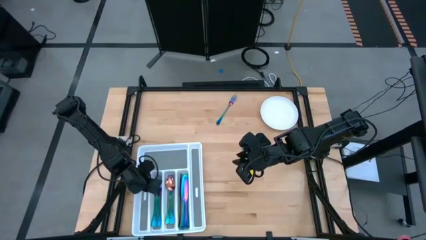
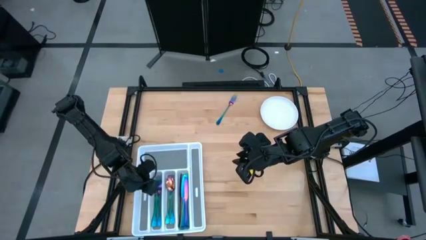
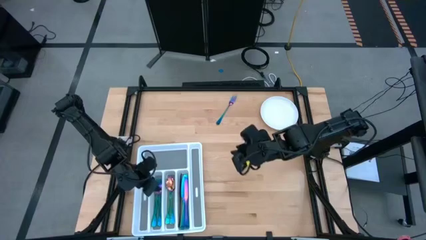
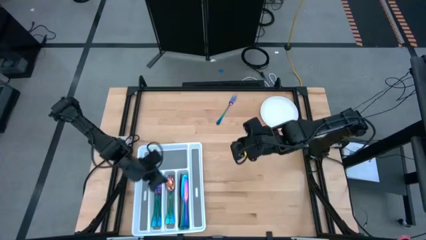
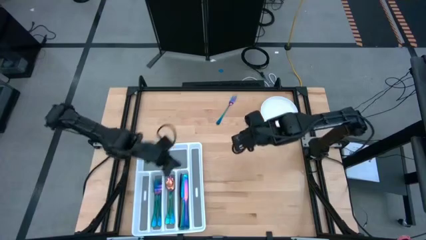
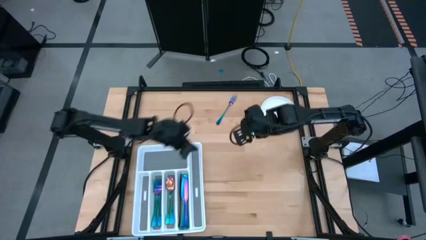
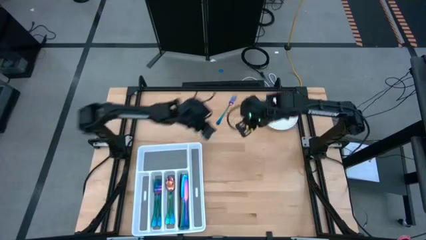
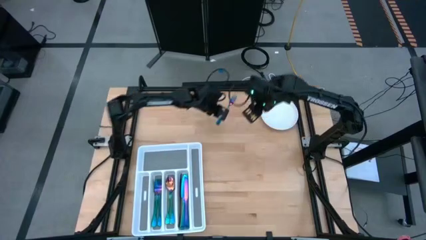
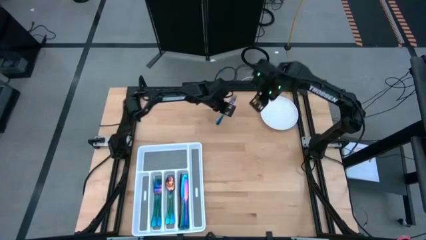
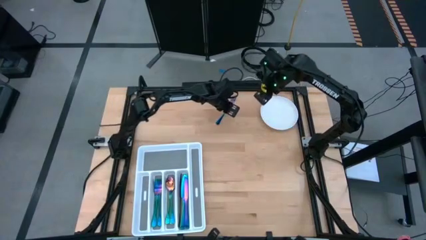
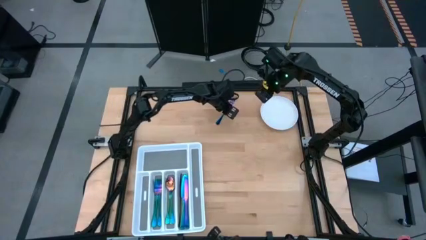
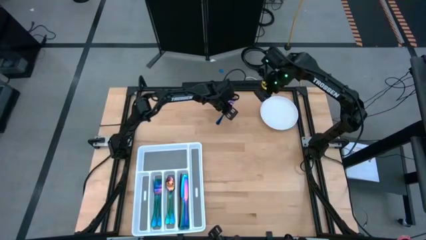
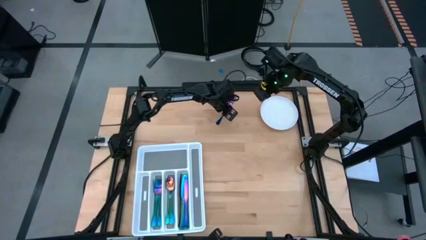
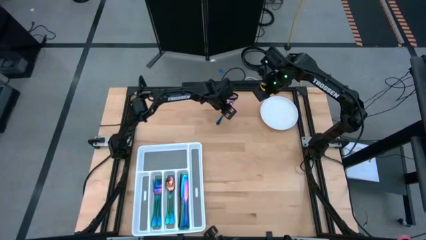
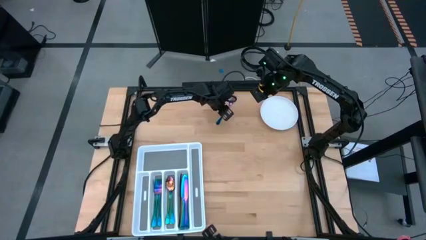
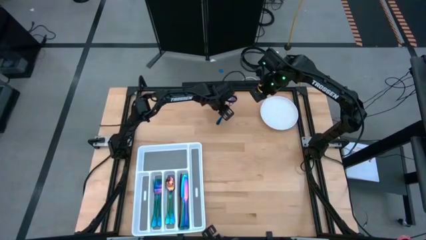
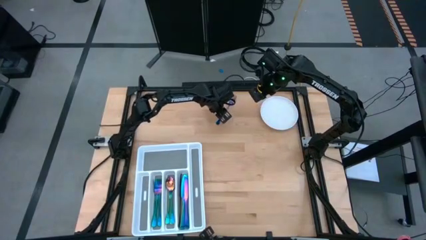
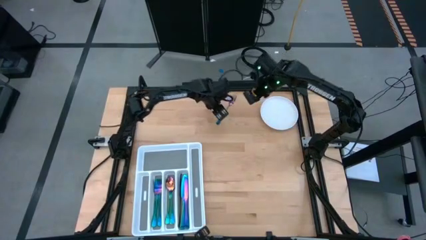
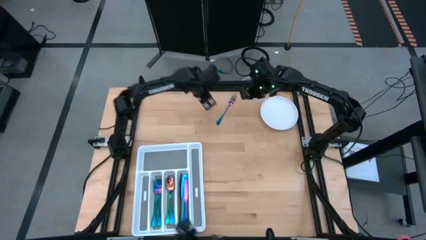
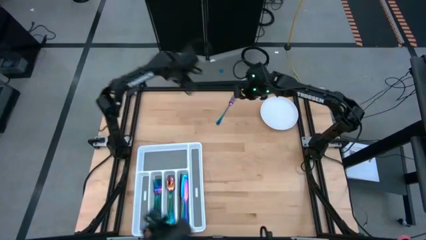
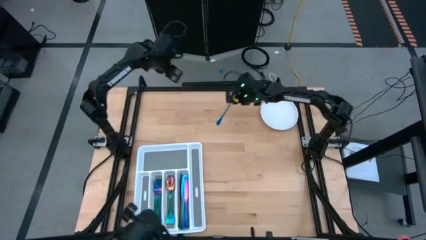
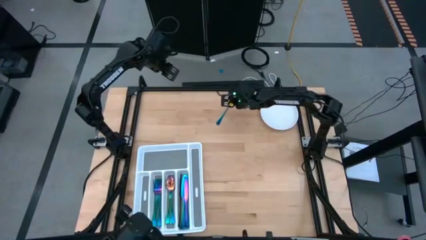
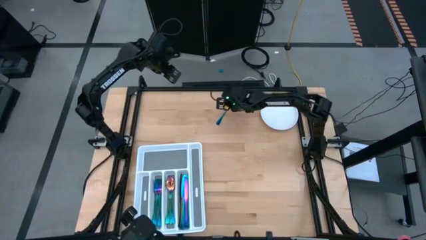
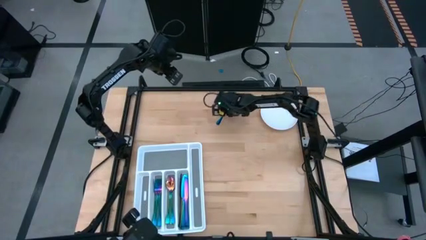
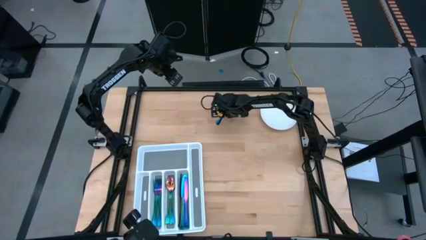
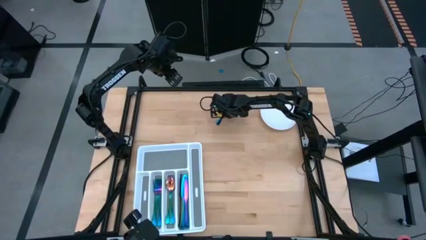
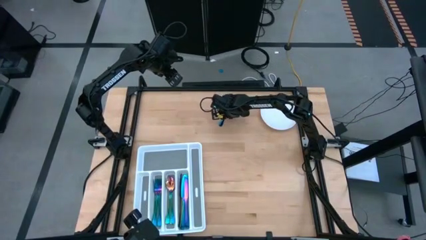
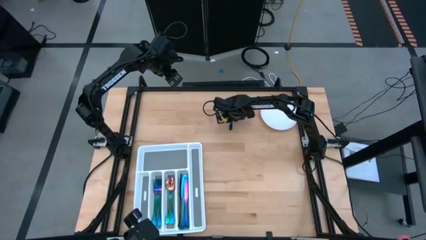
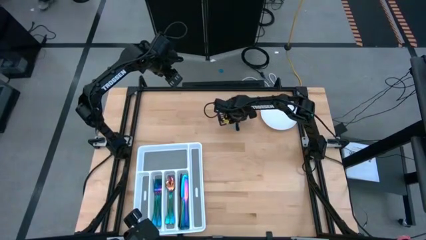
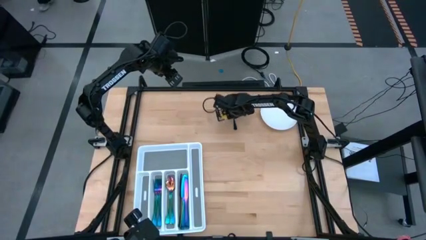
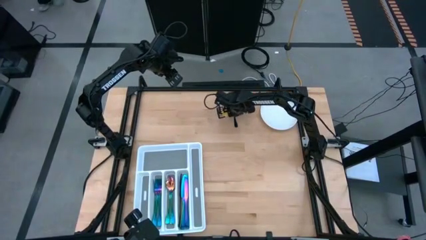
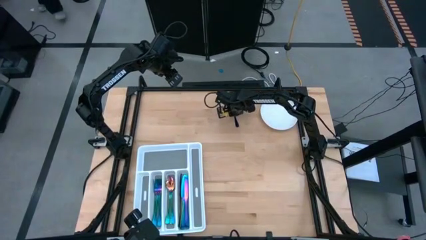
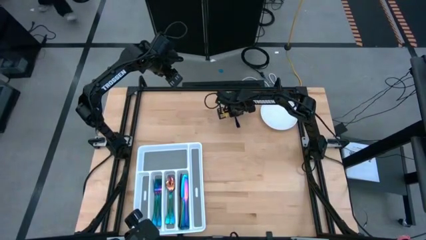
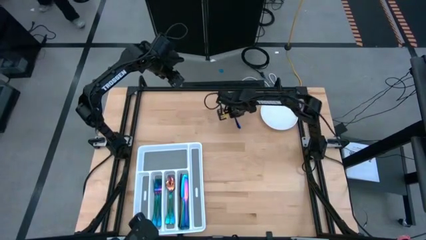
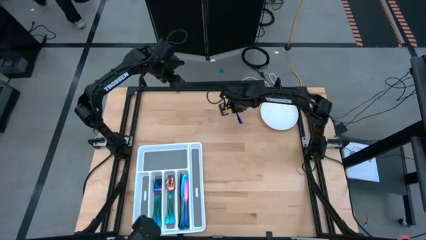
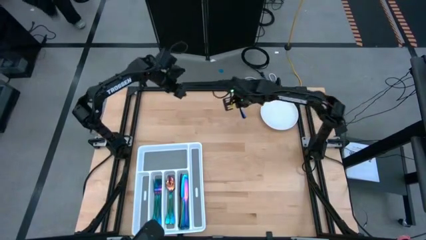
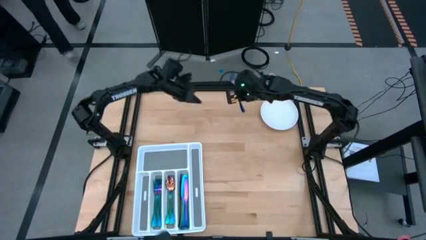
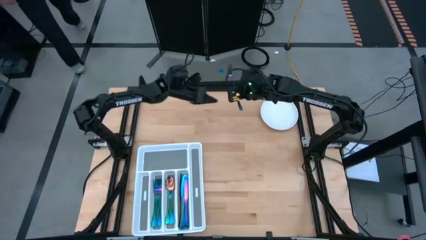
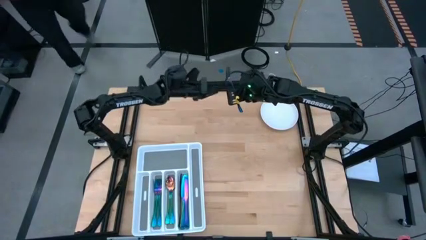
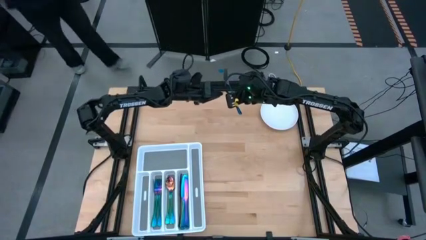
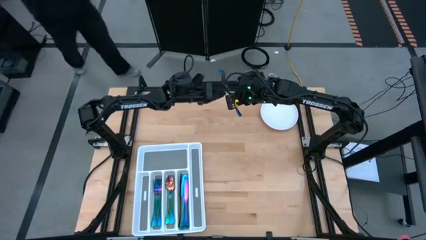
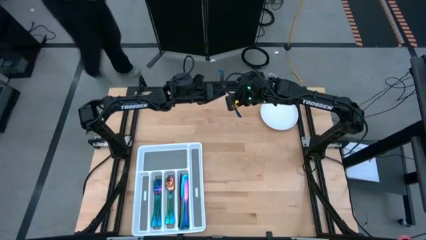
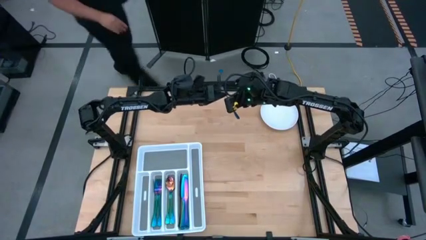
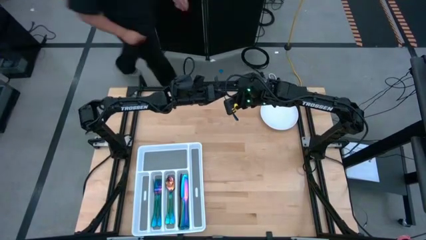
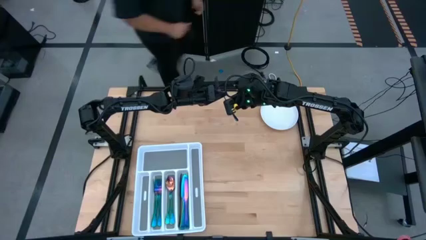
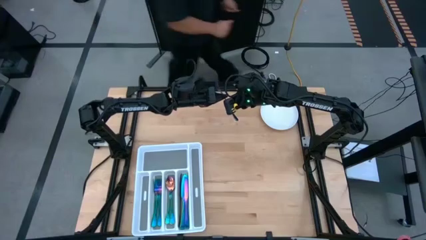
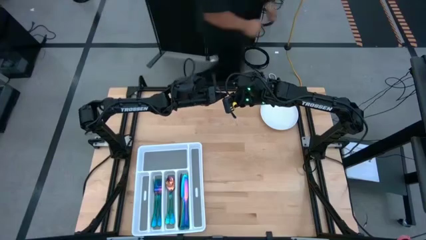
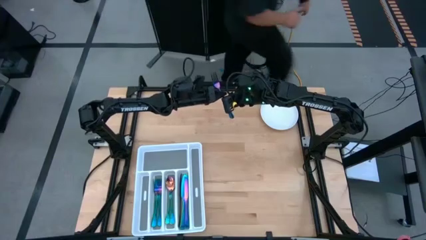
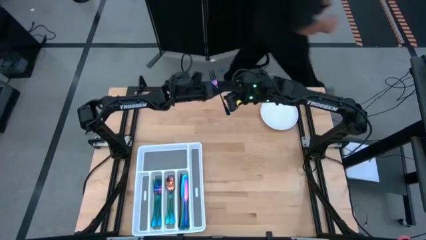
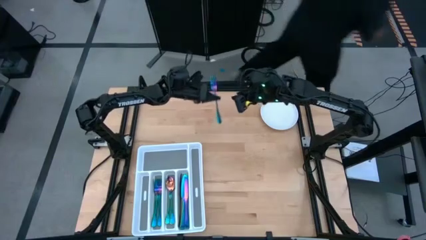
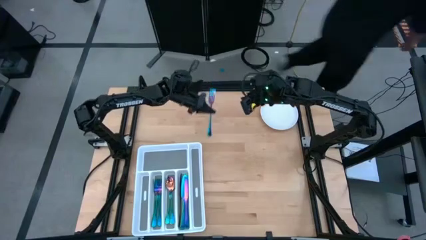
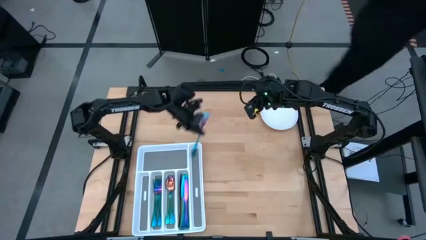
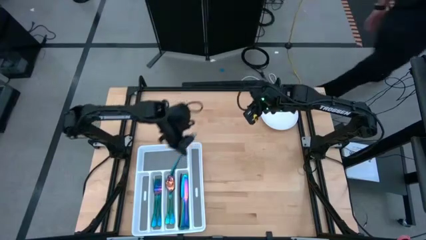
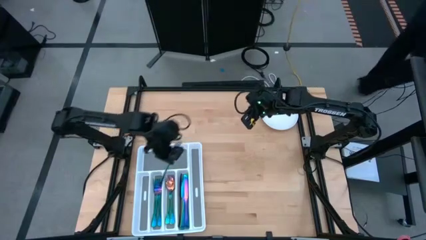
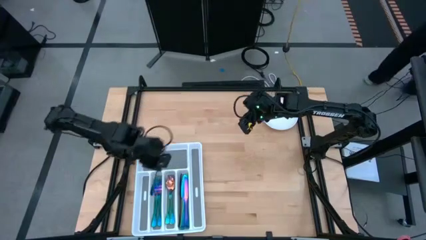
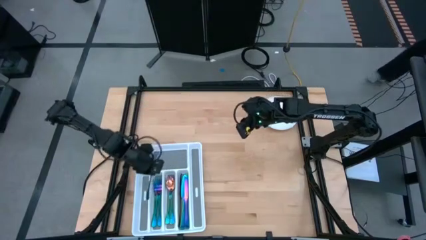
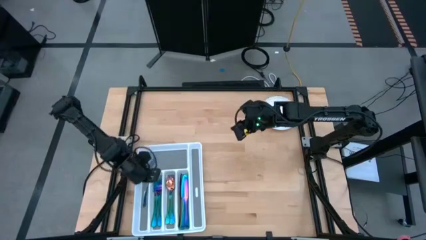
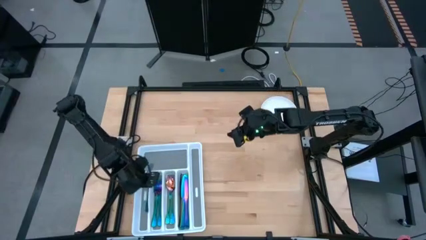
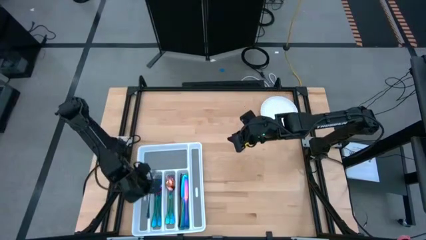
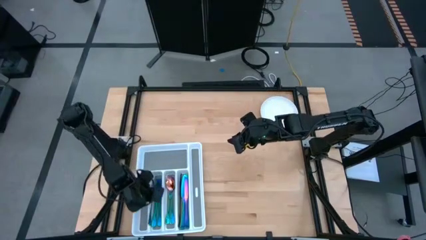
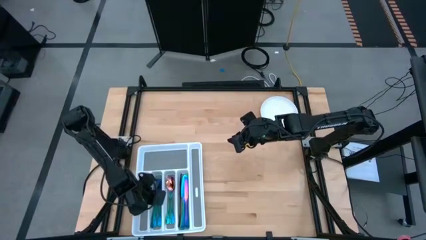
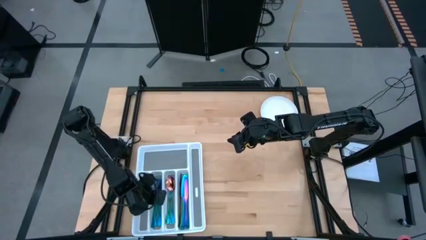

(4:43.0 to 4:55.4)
Task: Sort silverware
Put the iridescent fork into the cutlery tray

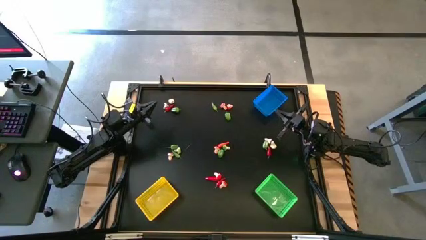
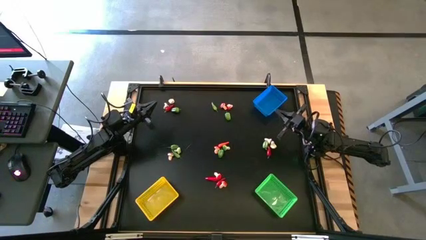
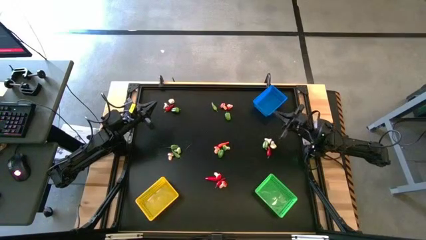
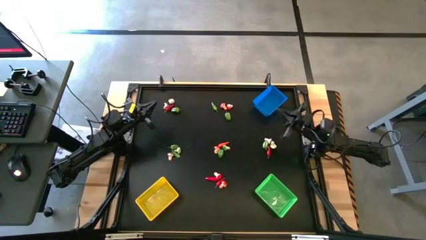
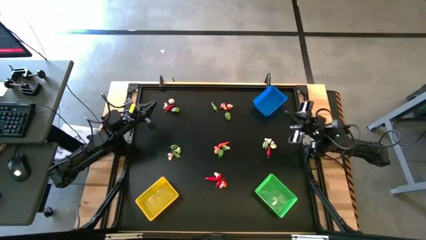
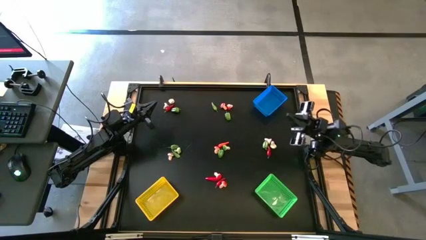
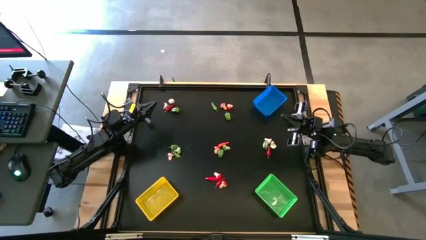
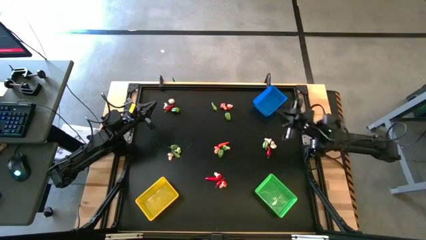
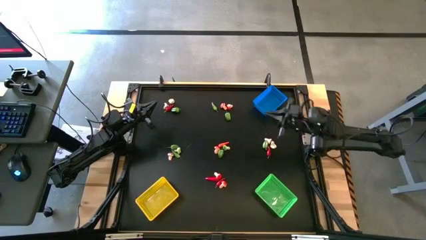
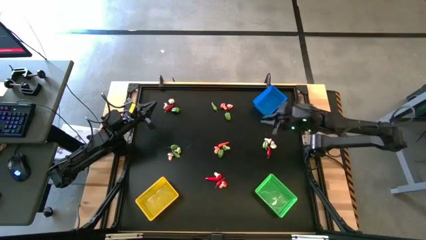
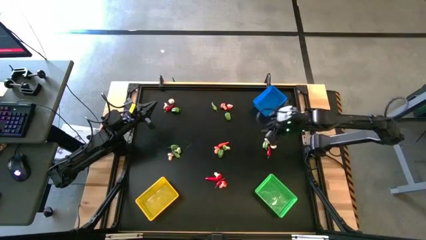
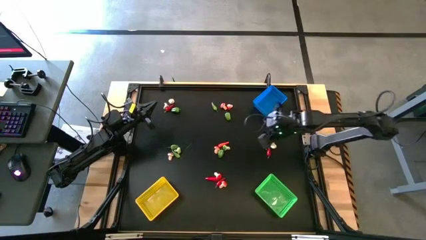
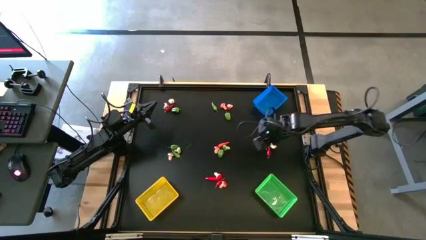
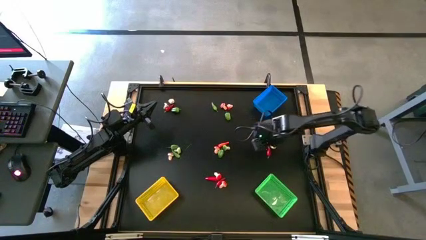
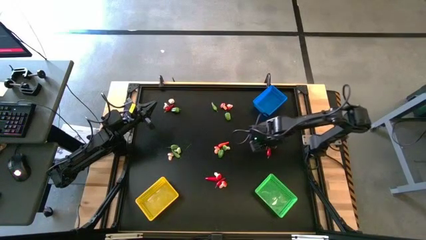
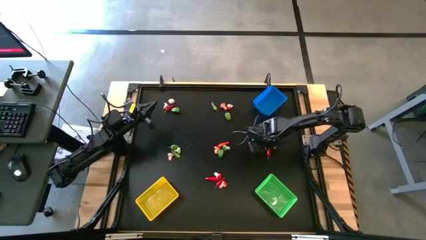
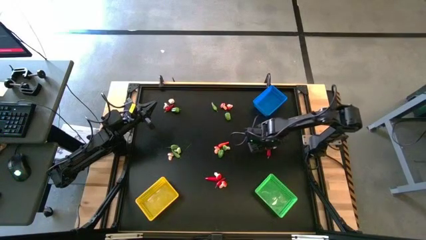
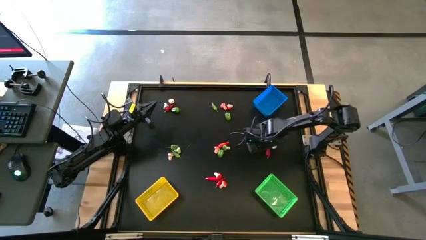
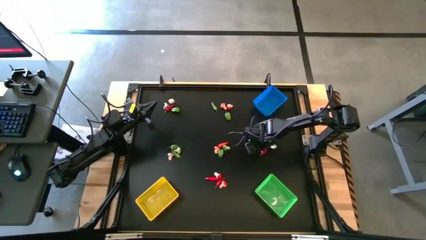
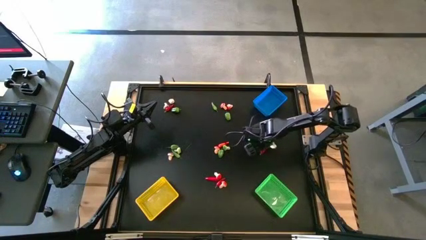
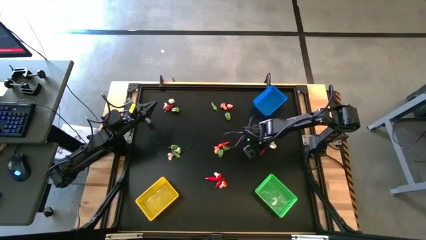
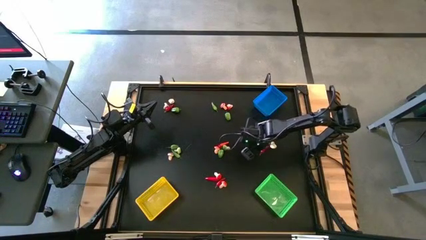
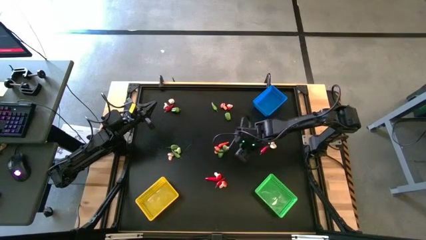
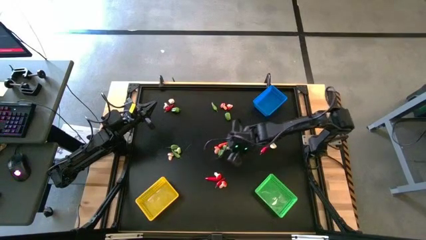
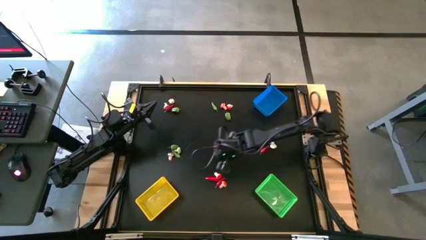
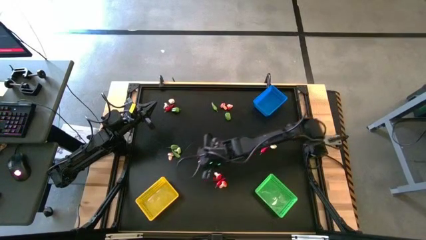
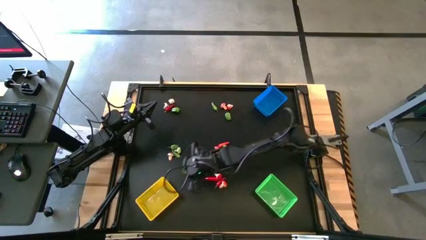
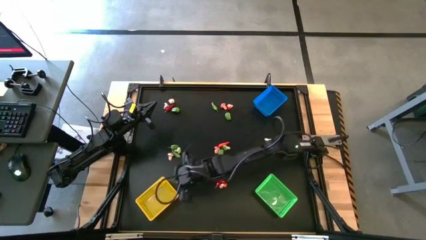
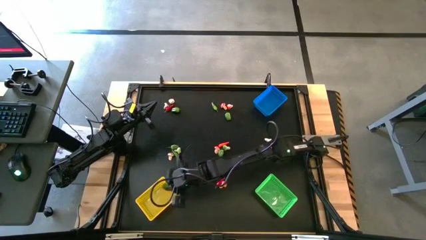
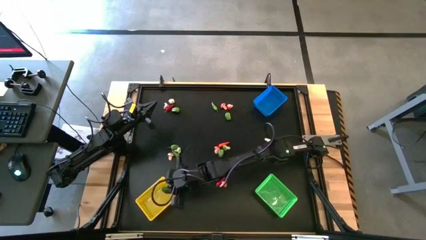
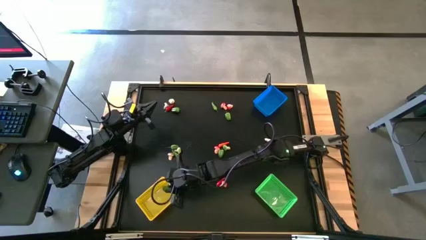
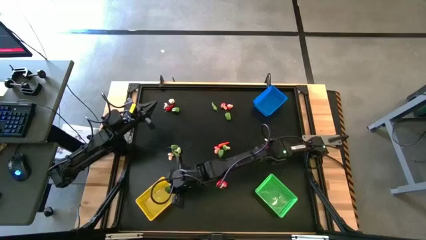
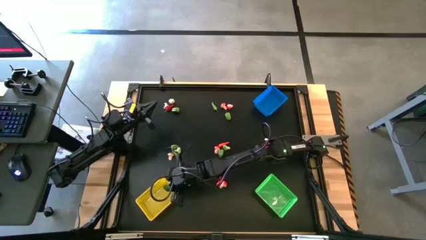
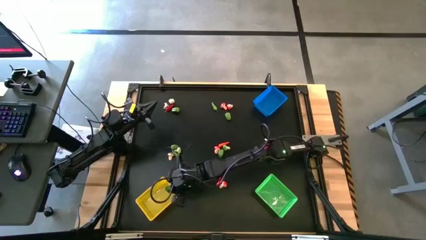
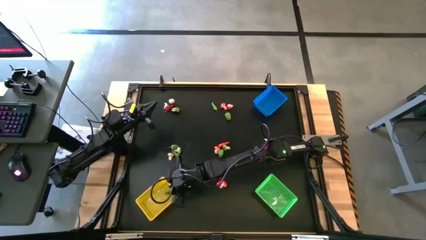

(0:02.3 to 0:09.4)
Task: Sort produce into baskets
Put the green chili pepper into the yellow bin
